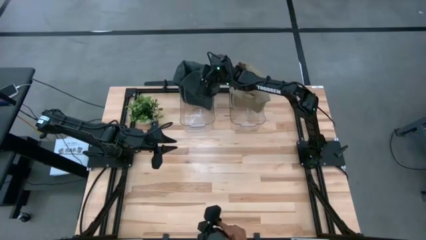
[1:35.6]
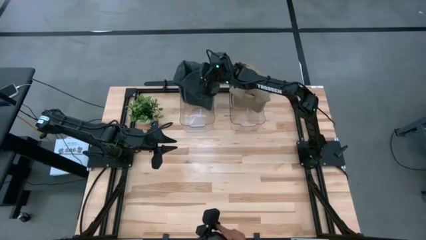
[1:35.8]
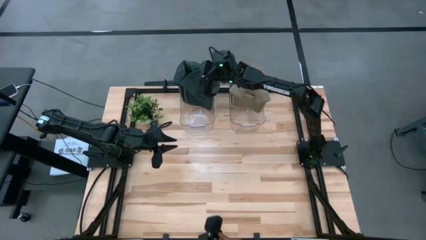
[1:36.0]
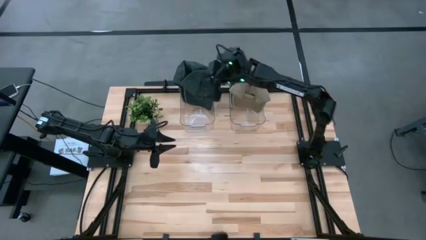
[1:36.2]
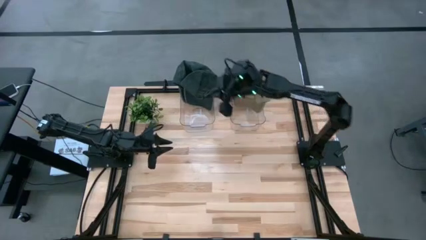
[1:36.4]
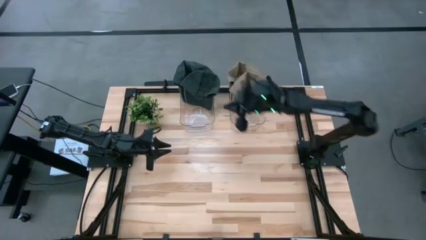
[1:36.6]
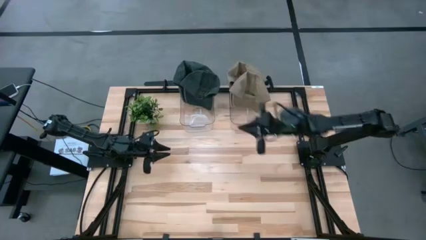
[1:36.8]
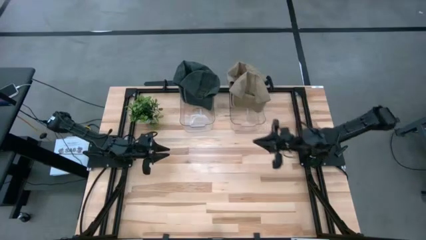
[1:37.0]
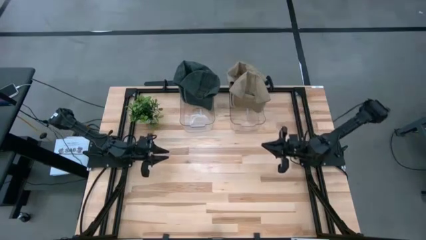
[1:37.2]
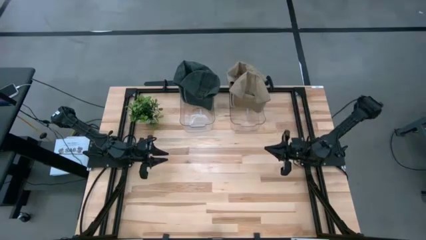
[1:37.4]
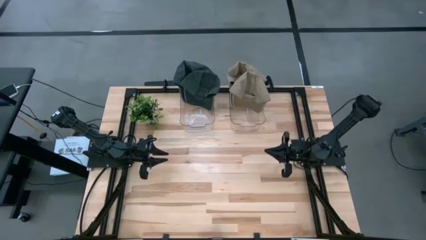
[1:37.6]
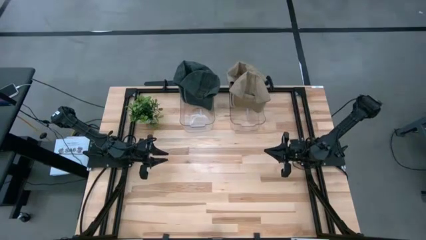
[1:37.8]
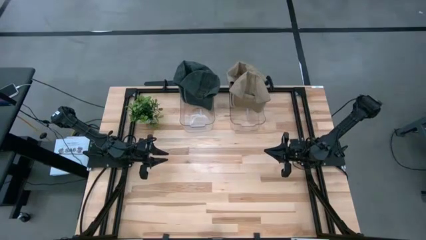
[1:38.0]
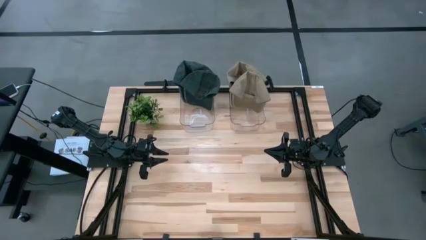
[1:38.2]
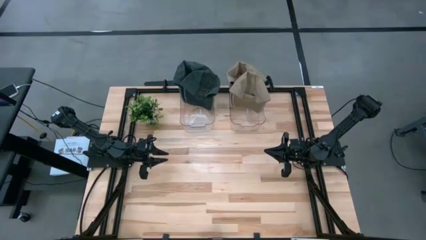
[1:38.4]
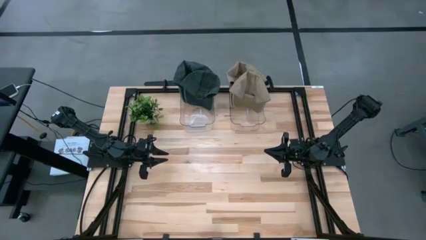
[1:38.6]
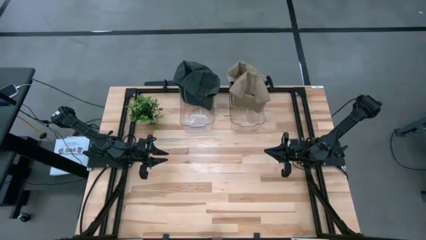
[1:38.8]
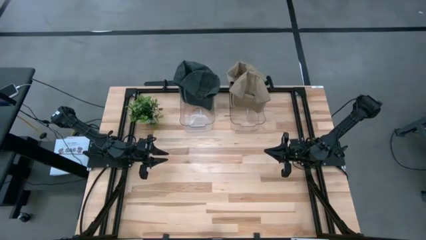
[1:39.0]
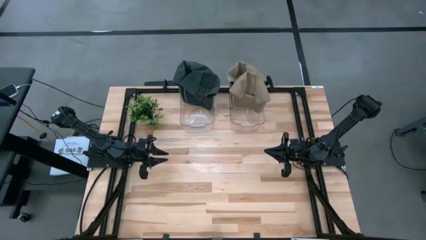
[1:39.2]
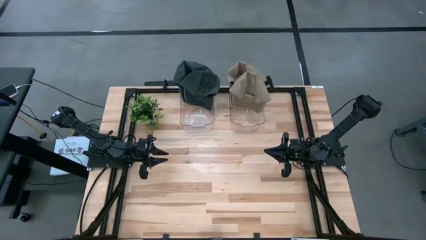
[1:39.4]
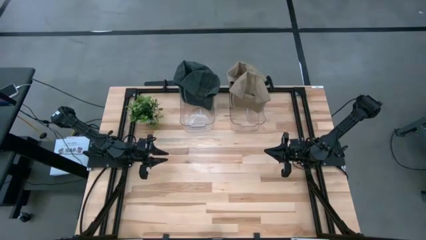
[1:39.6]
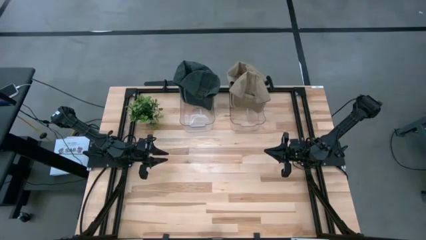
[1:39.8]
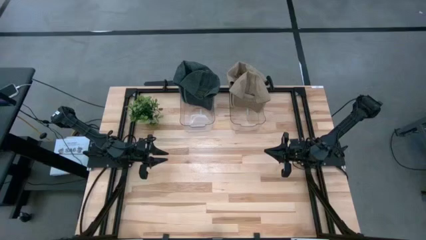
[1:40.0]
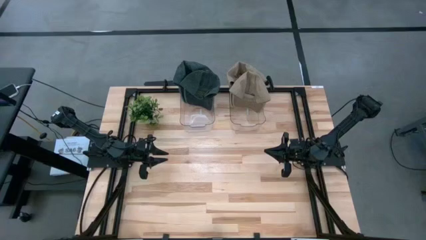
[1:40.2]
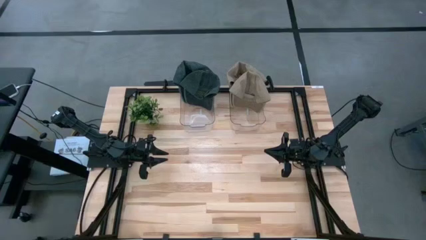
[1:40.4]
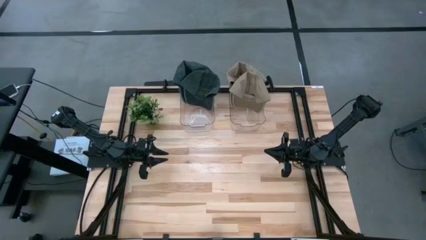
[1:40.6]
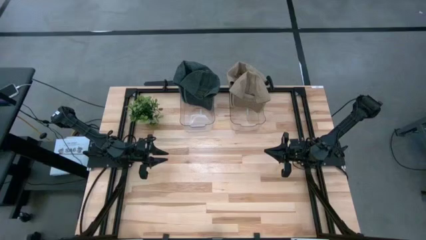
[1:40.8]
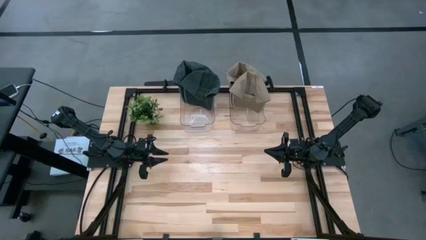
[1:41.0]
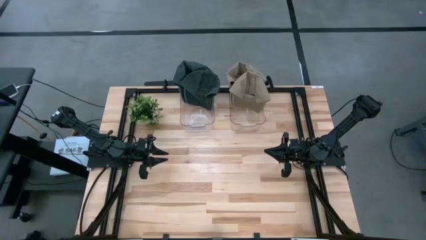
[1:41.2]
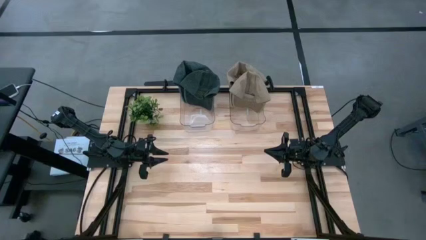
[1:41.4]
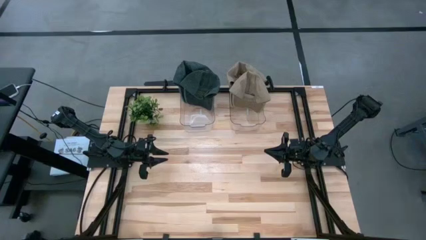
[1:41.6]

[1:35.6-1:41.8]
Task: Pick & Place hat
Return to Home Position

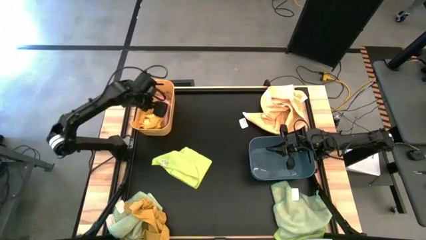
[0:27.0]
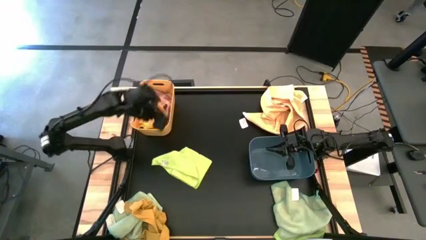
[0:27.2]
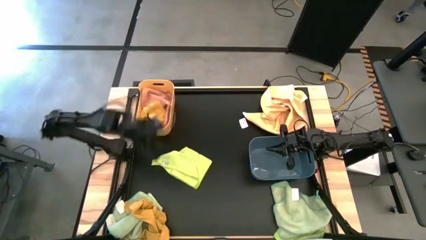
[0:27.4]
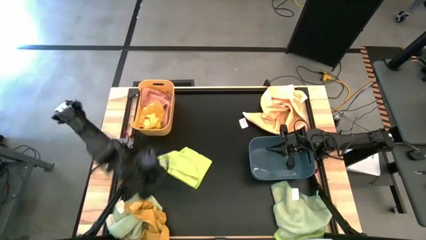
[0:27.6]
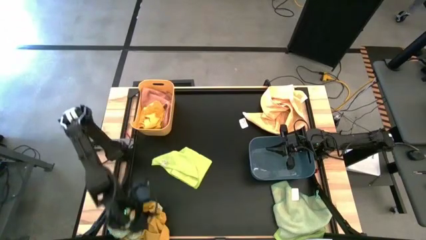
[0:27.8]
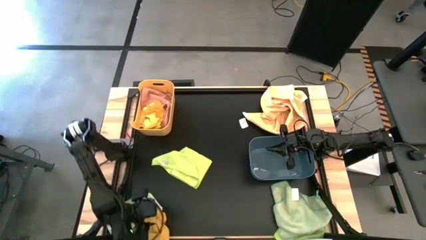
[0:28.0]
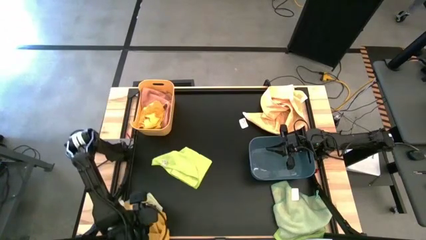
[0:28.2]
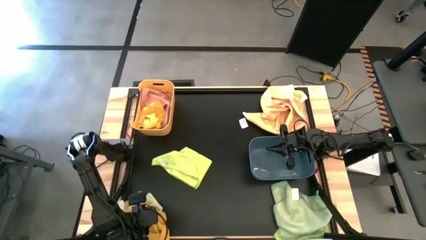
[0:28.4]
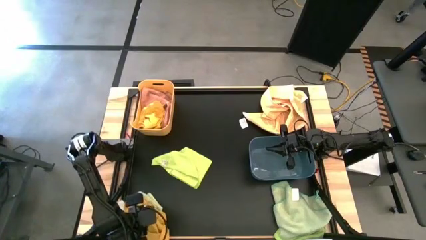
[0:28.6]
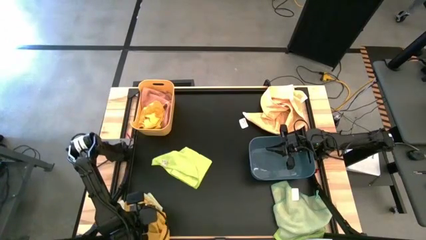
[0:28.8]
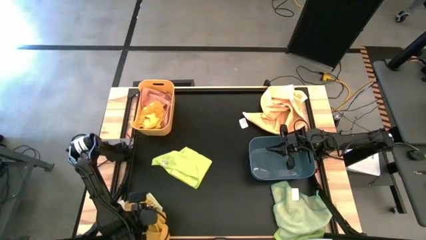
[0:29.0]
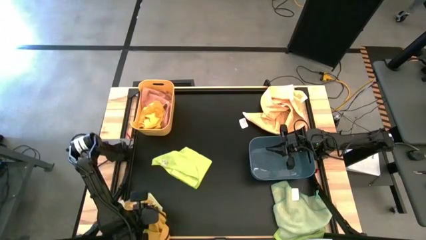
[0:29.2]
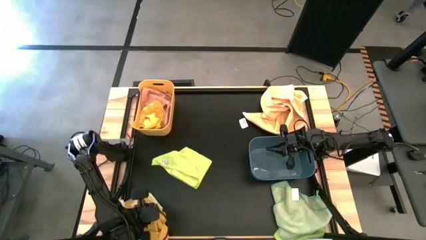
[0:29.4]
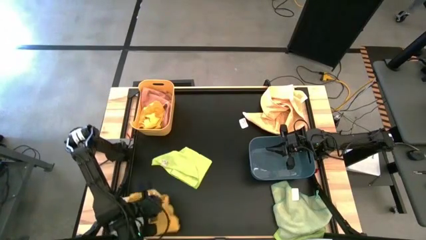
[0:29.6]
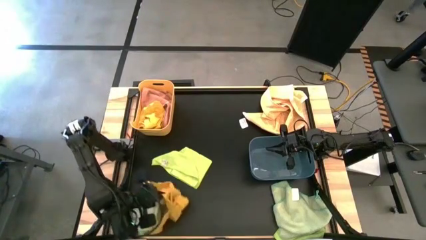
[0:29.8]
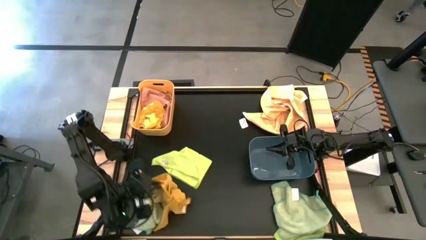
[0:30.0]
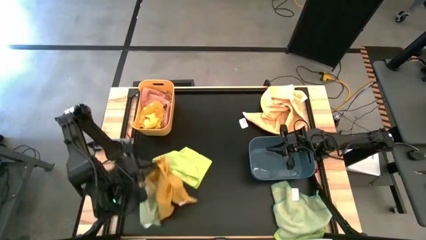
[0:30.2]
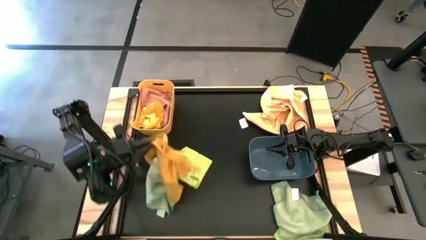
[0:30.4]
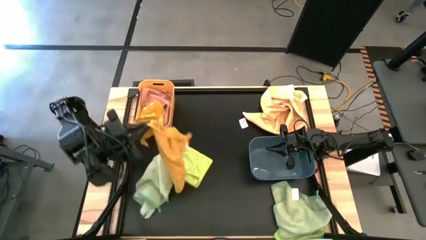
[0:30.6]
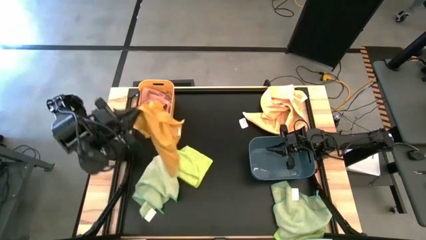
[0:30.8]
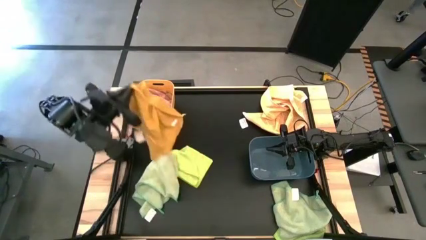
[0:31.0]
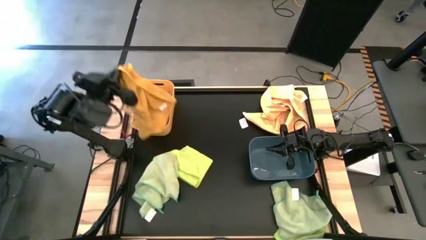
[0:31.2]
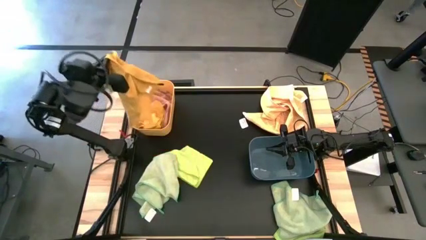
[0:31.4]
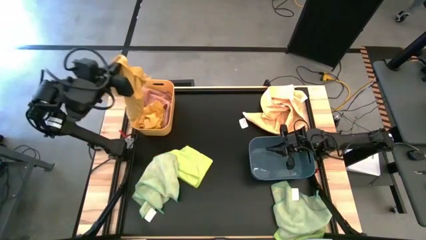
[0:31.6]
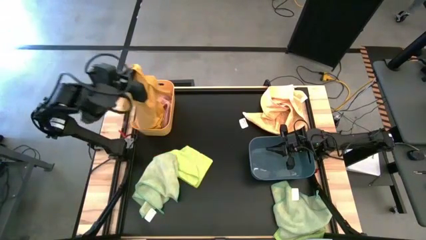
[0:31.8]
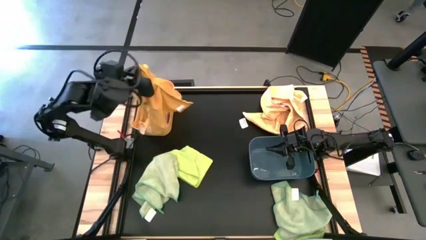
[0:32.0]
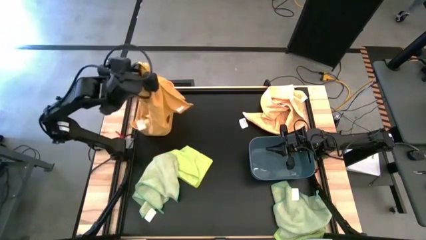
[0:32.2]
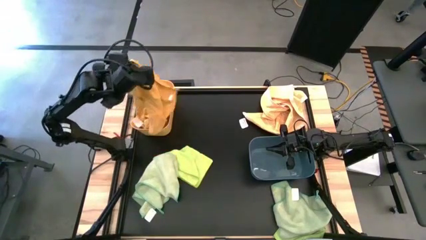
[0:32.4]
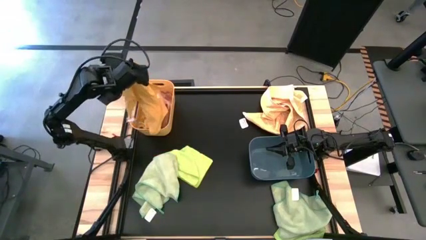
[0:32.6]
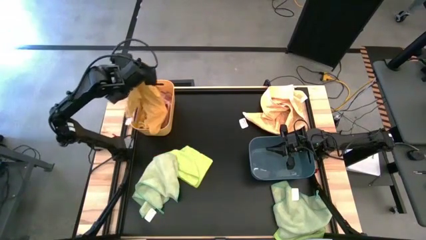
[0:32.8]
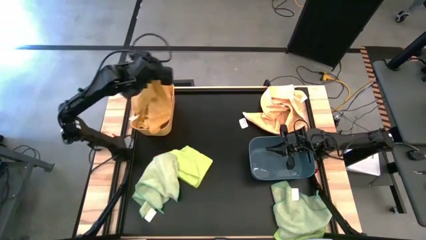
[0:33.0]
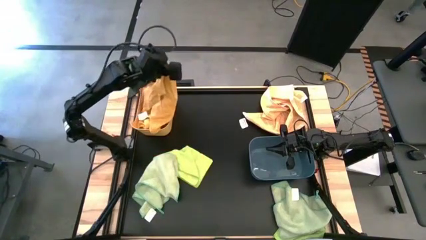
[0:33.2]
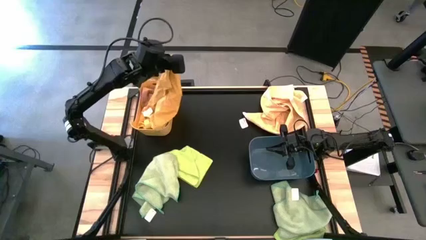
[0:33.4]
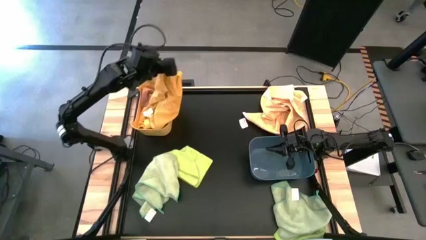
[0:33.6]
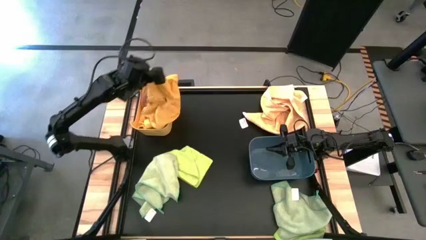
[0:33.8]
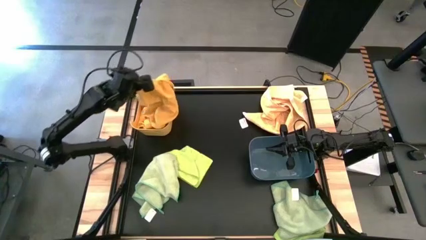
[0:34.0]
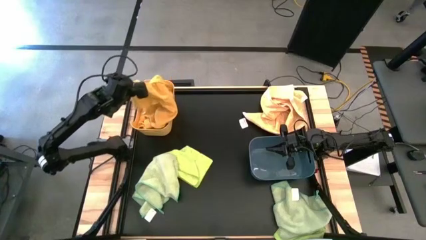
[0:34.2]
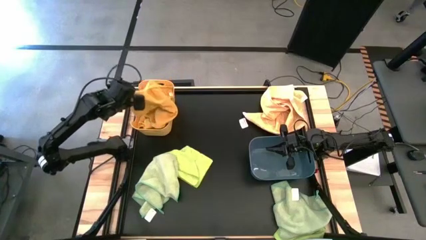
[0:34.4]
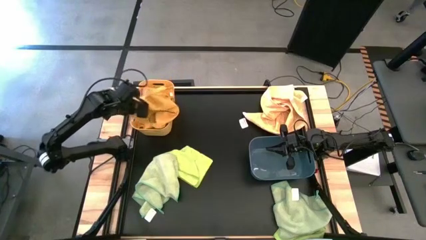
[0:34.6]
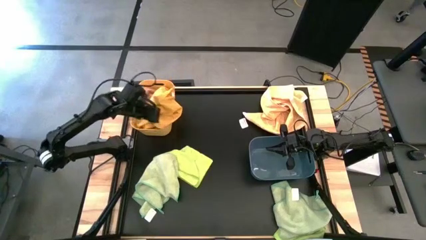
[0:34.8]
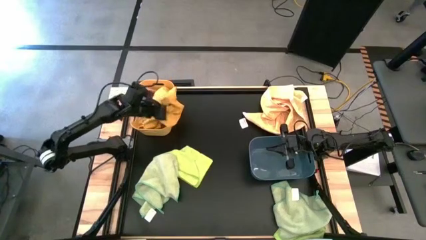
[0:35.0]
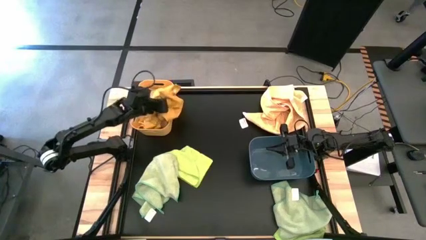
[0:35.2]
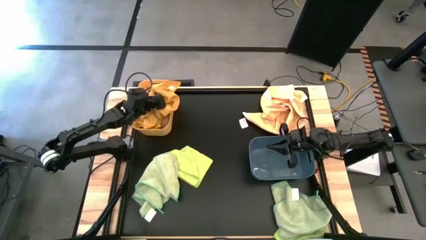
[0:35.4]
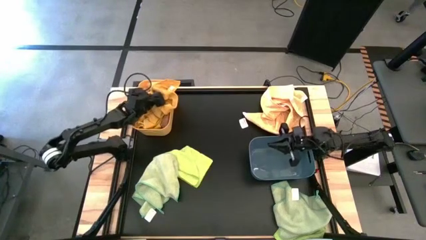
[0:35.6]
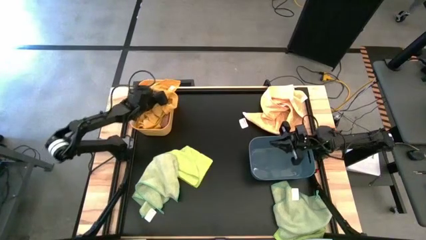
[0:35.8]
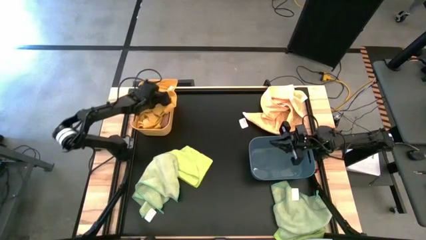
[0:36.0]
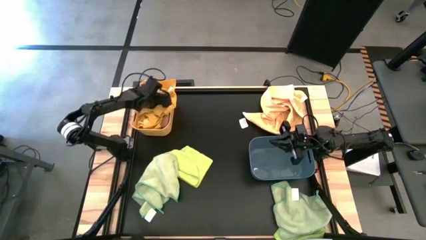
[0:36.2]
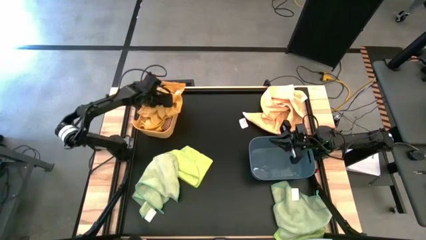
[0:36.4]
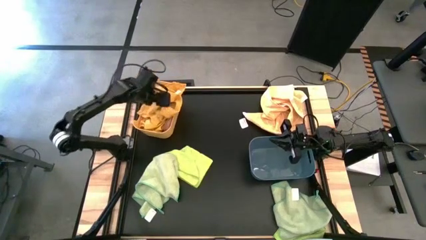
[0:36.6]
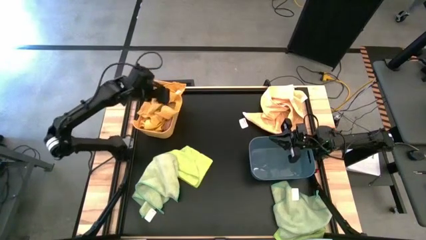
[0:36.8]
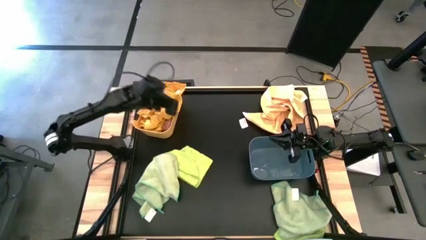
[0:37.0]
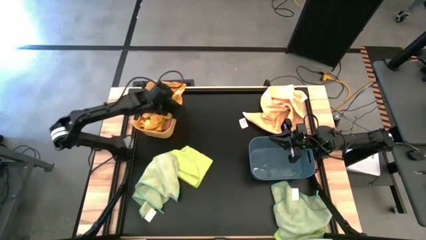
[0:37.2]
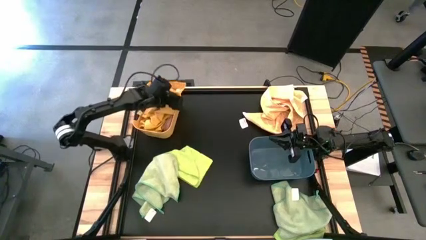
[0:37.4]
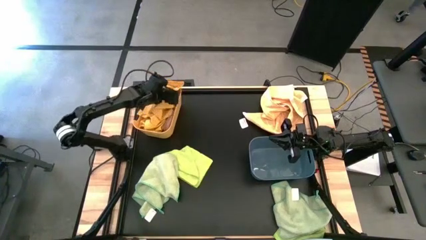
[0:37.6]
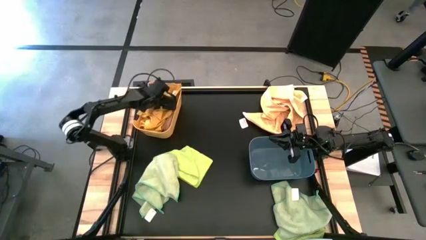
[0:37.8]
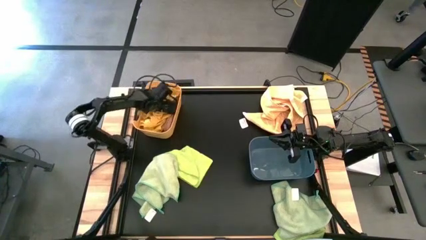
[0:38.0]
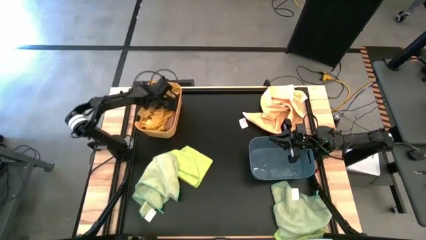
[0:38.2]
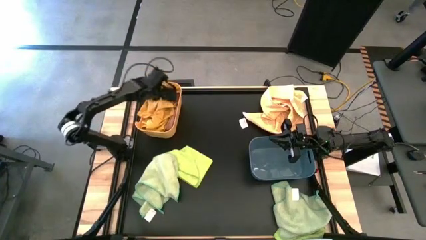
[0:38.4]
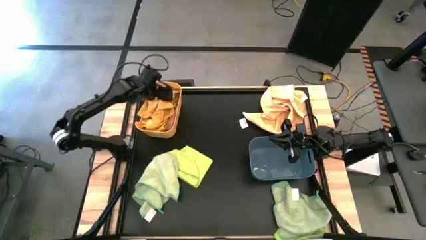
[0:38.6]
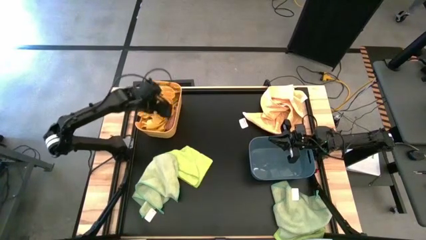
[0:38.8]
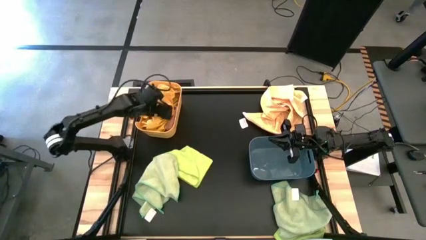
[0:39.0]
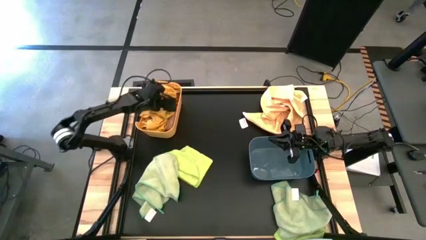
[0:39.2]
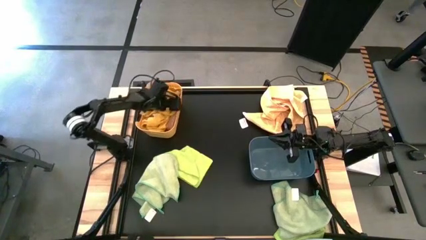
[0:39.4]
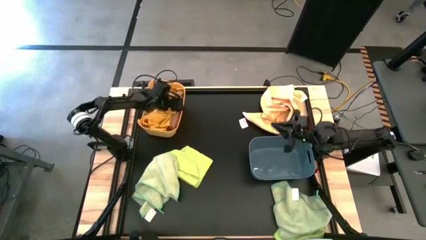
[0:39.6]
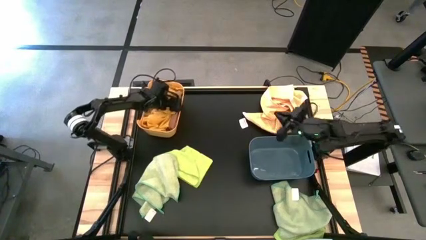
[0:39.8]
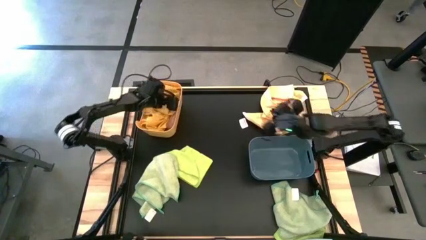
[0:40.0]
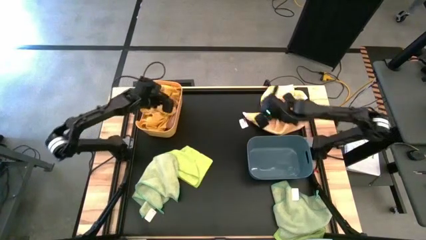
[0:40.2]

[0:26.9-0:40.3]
Task: Sort towels by color in basket
Put the yellow microfiber cloth into the yellow bin
